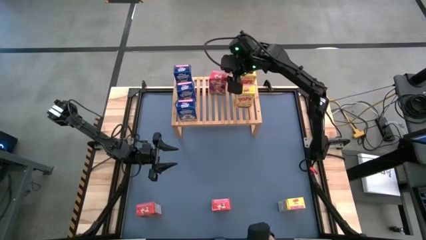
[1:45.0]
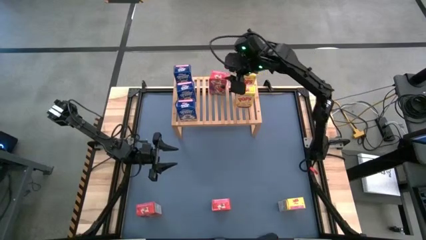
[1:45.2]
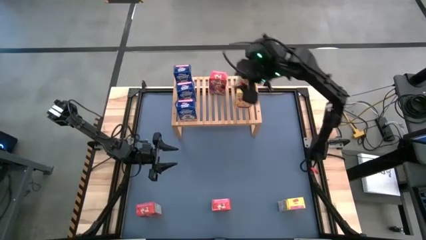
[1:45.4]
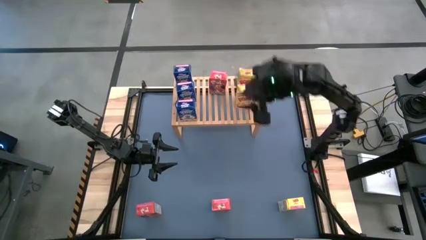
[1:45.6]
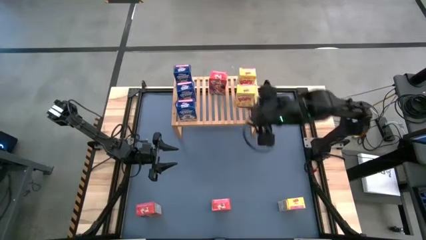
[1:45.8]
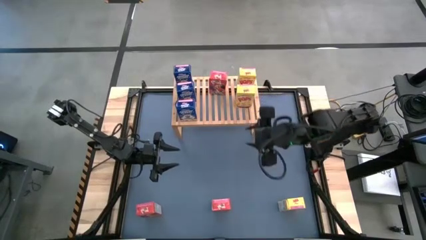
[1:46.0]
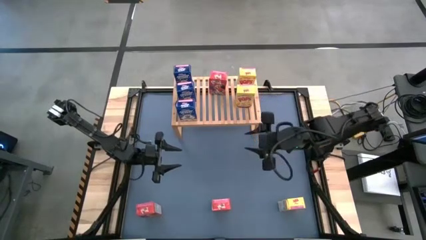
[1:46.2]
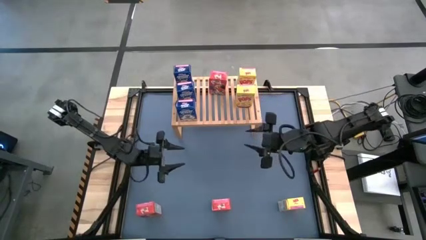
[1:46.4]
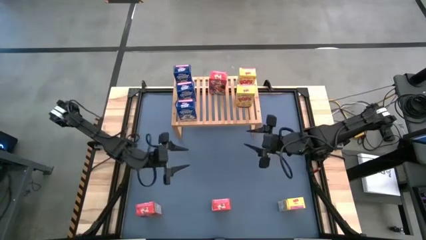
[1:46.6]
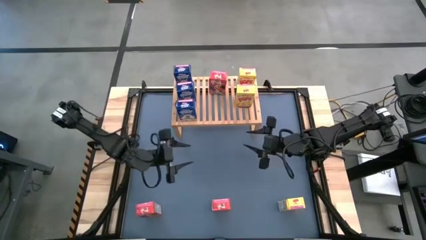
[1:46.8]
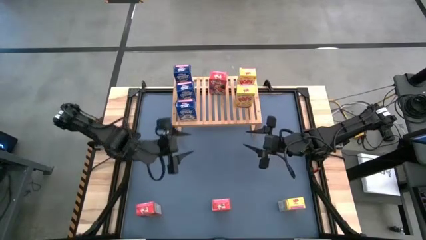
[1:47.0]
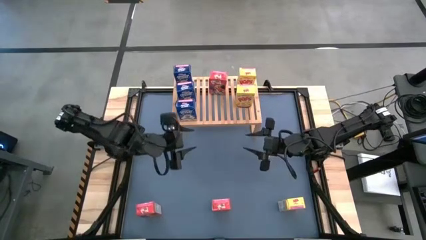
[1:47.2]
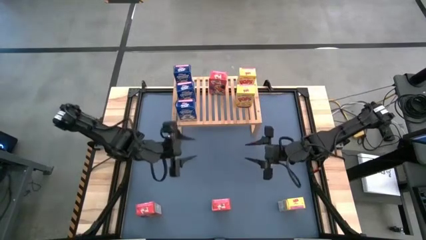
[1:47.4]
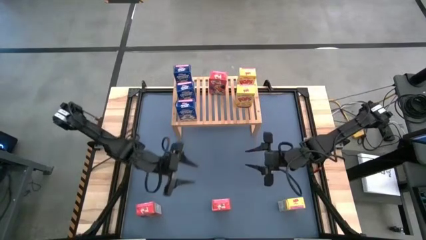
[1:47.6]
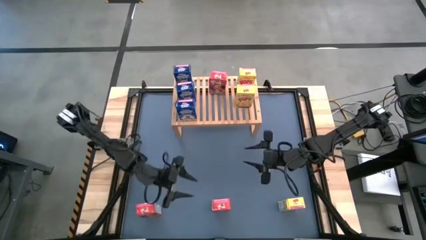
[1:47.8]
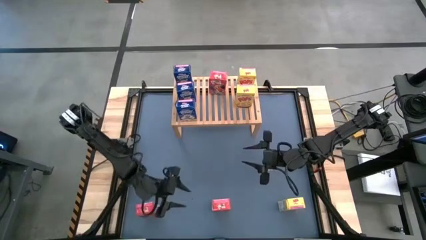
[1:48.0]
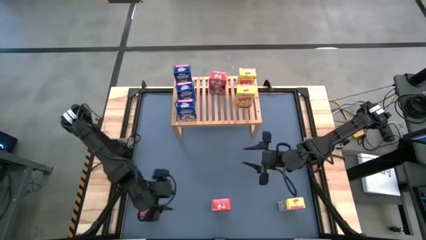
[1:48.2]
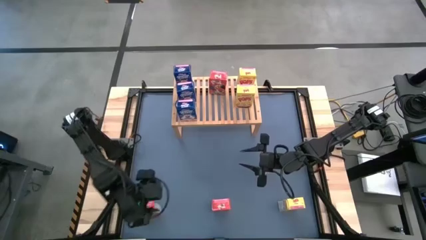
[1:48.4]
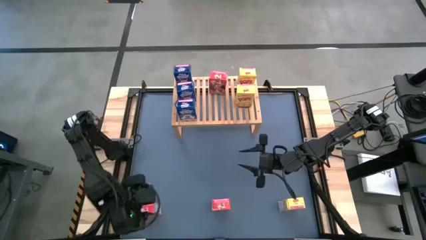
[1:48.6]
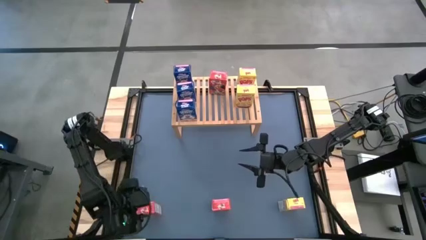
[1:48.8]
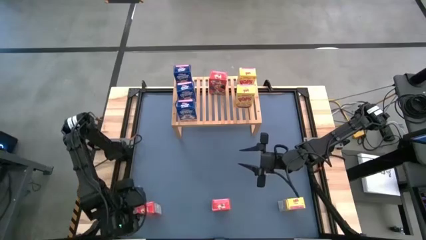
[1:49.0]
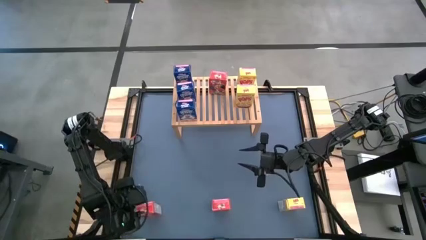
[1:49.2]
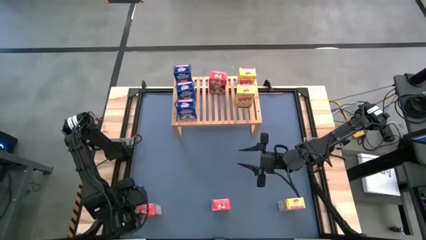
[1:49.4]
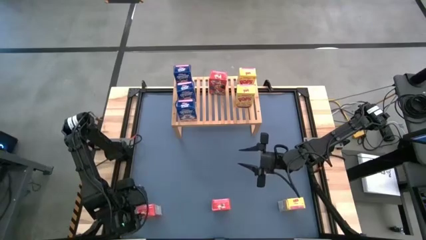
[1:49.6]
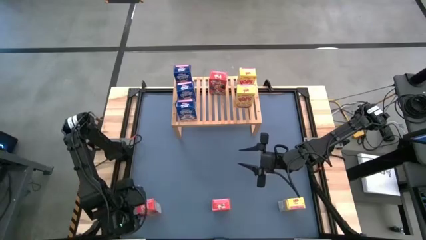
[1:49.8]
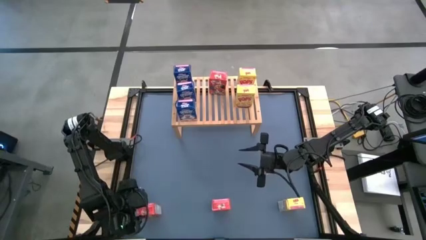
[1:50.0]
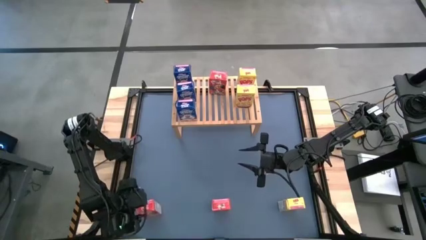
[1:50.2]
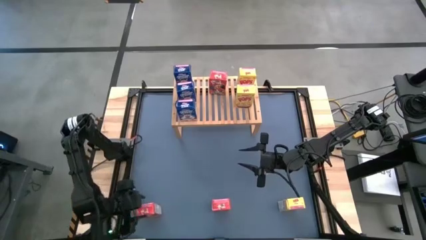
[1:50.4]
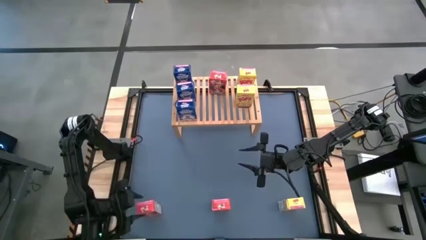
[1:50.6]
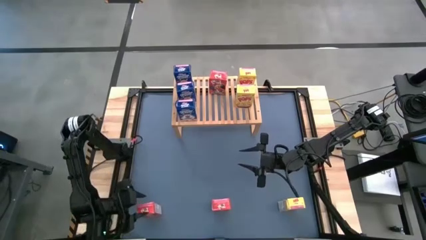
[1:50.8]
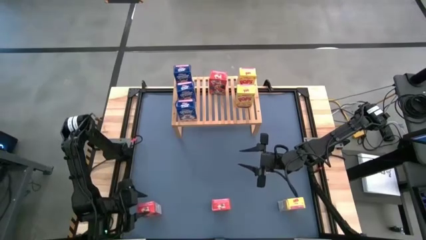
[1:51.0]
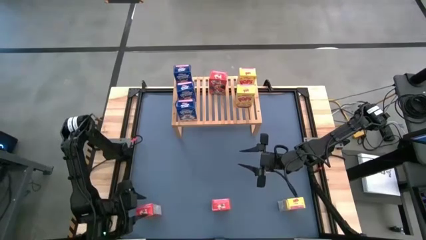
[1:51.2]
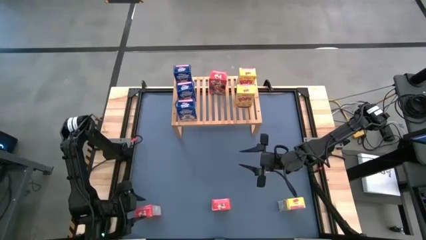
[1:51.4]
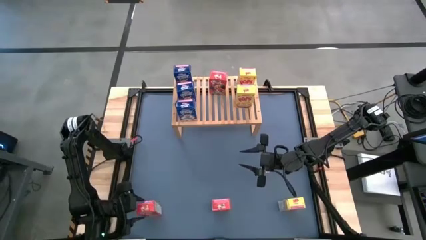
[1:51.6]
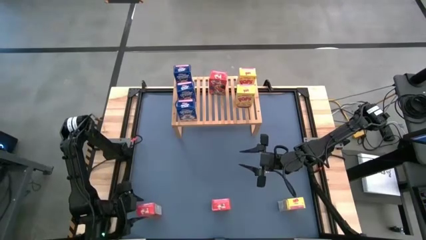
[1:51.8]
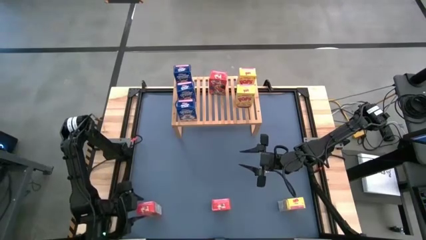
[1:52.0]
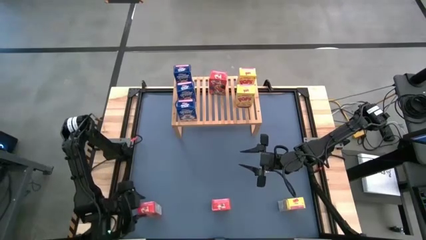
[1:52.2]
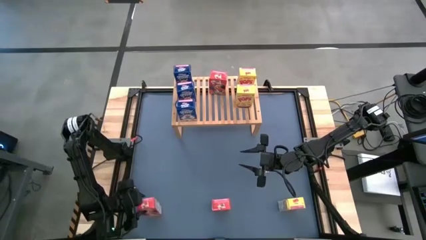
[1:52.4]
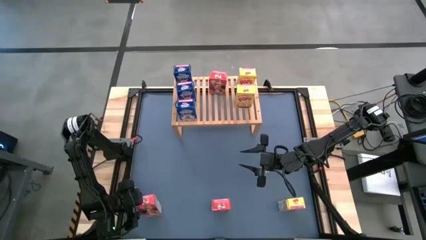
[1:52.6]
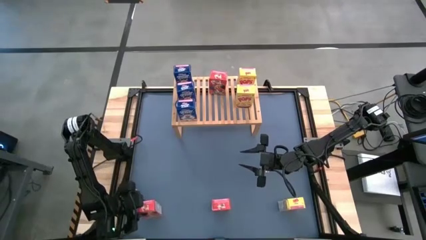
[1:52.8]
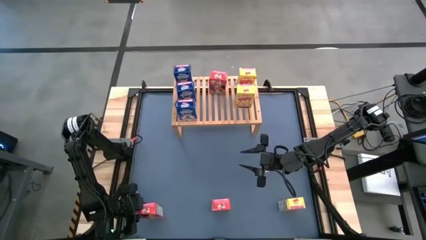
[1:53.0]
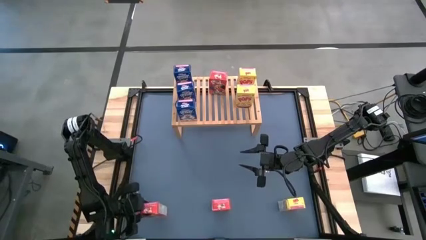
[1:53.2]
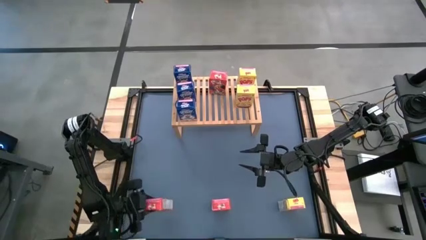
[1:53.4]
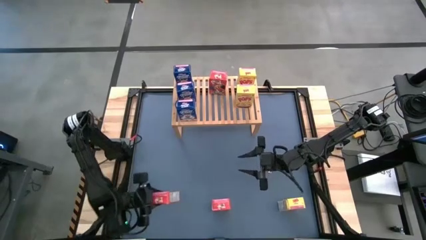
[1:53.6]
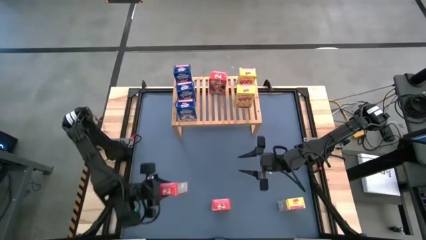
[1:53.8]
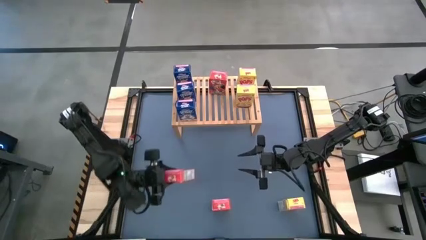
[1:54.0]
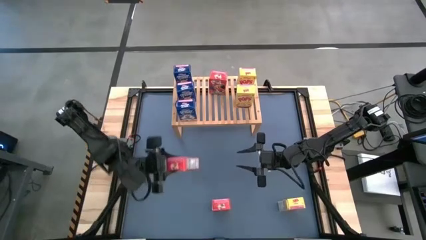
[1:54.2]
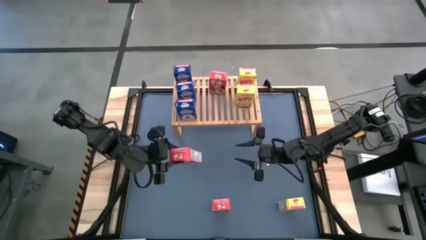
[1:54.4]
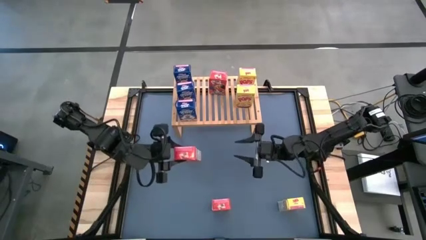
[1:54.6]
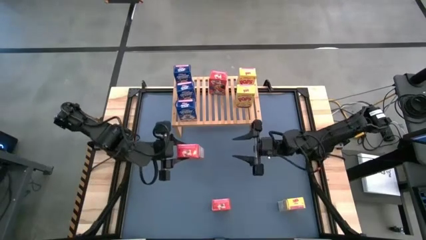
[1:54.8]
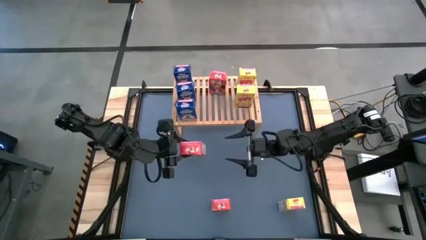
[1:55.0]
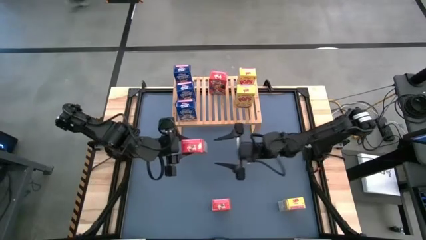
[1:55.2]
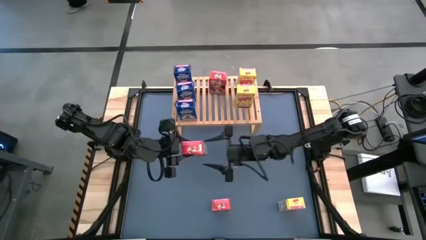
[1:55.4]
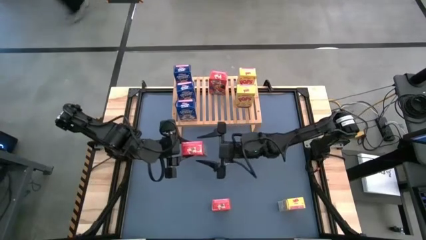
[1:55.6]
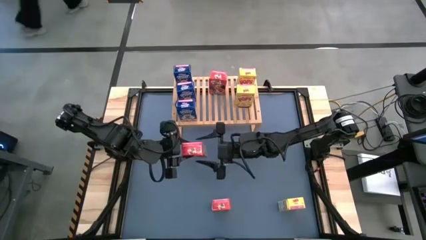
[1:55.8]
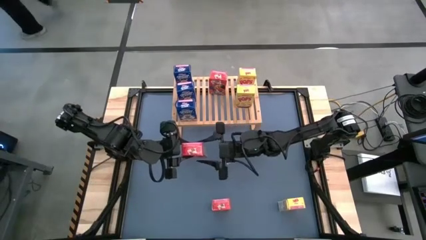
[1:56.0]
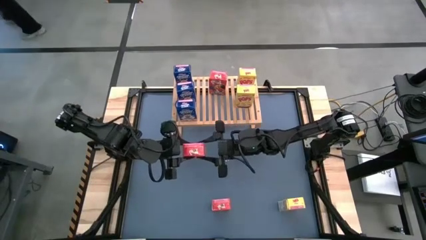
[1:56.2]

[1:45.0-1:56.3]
Task: Stack cereal on shelf
Put the left red cereal box on the shelf aligned with the other red cereal box

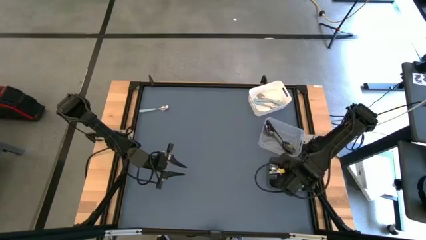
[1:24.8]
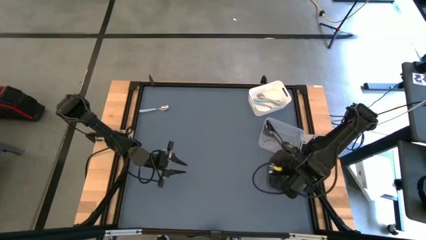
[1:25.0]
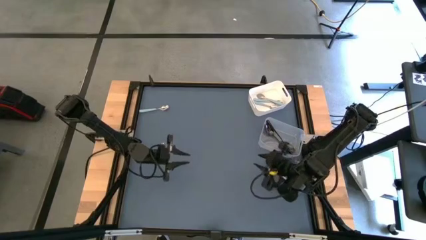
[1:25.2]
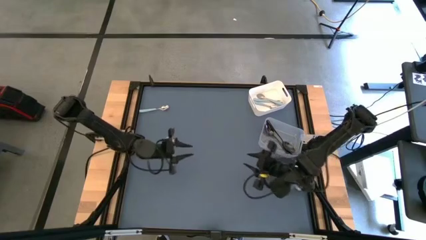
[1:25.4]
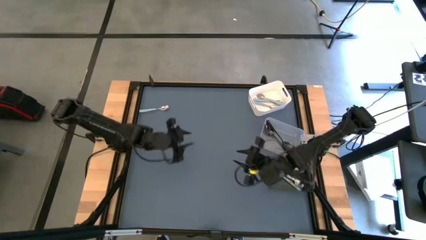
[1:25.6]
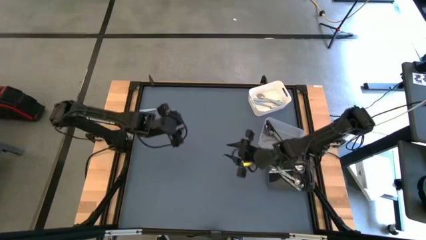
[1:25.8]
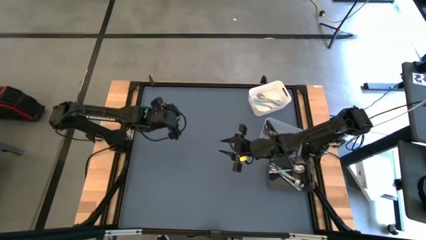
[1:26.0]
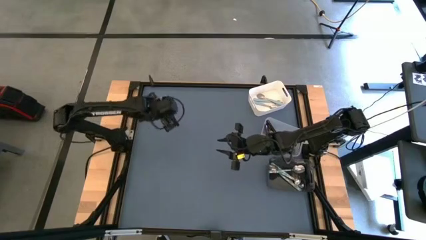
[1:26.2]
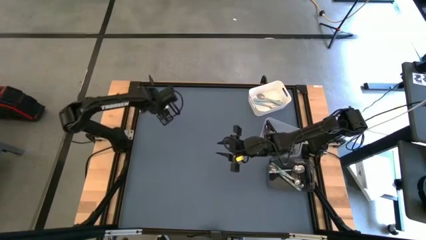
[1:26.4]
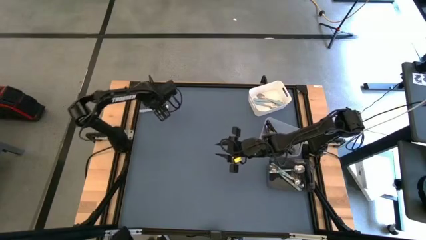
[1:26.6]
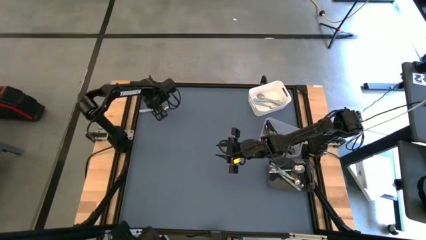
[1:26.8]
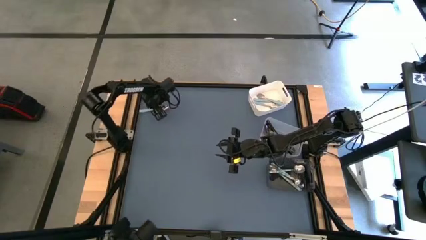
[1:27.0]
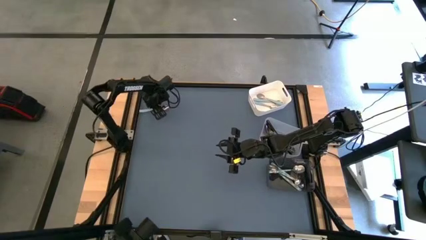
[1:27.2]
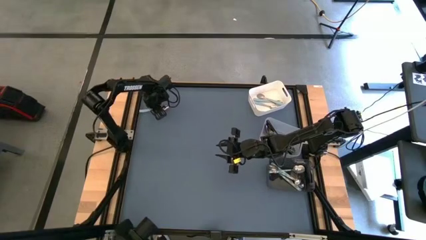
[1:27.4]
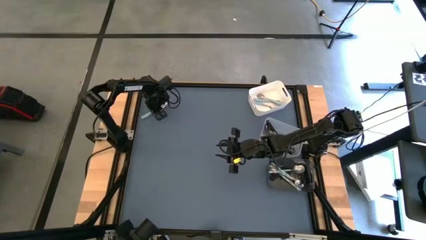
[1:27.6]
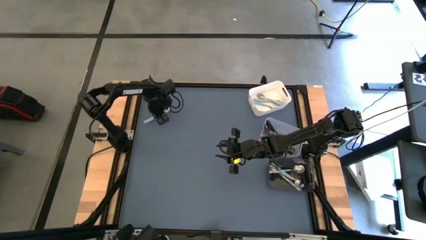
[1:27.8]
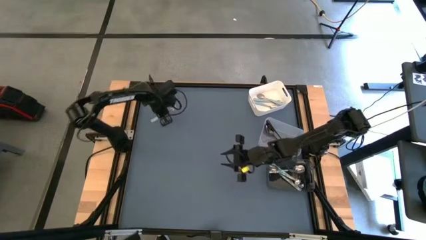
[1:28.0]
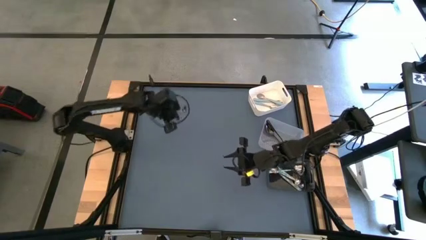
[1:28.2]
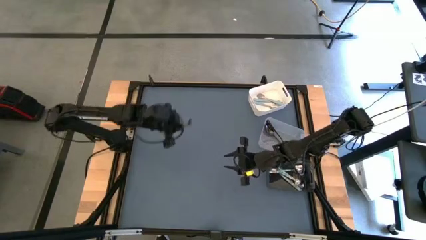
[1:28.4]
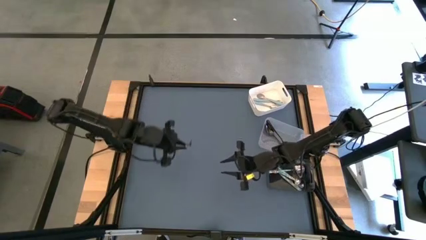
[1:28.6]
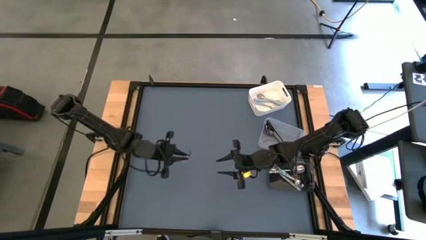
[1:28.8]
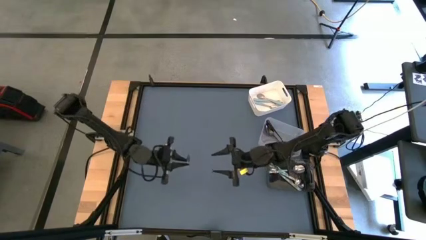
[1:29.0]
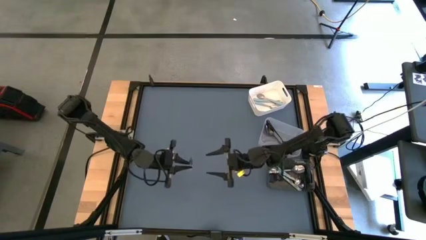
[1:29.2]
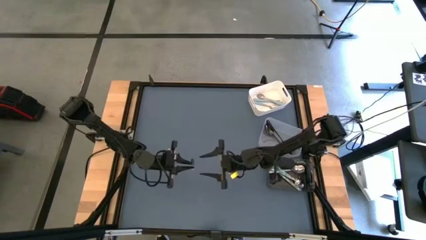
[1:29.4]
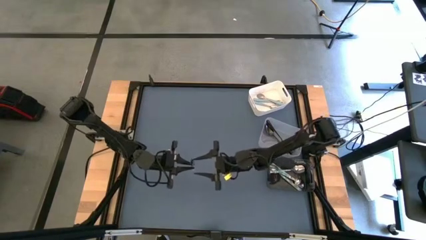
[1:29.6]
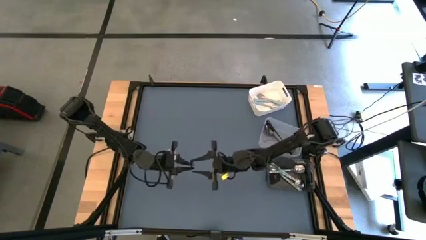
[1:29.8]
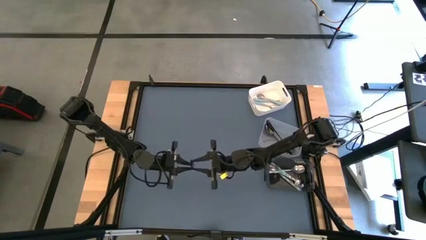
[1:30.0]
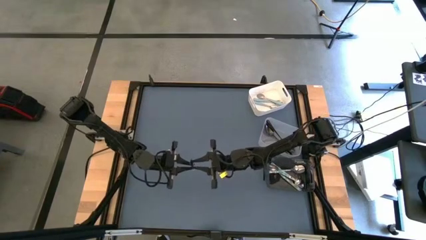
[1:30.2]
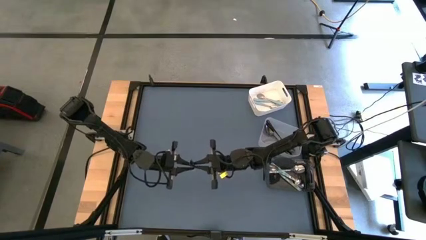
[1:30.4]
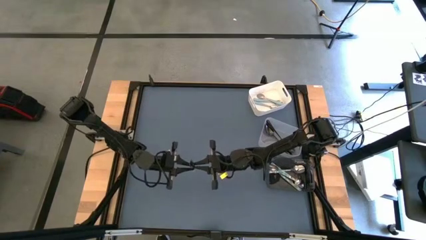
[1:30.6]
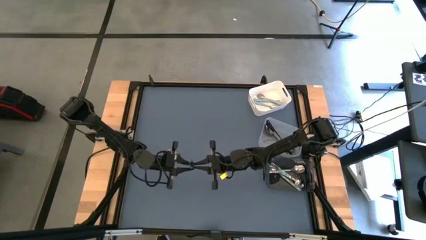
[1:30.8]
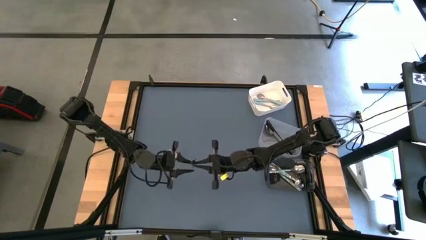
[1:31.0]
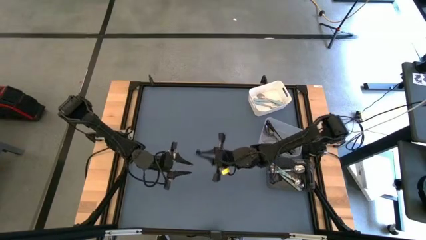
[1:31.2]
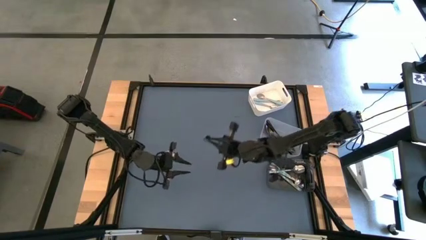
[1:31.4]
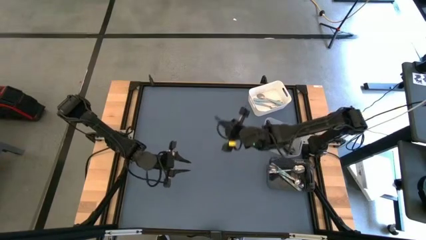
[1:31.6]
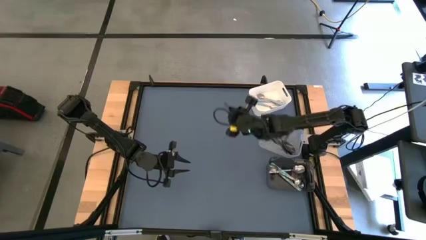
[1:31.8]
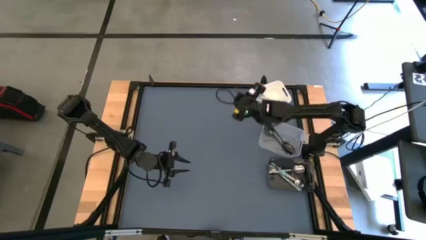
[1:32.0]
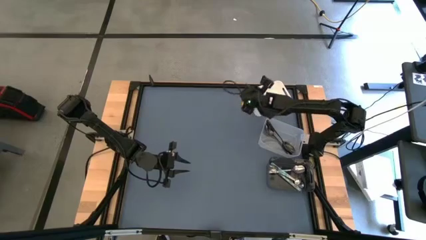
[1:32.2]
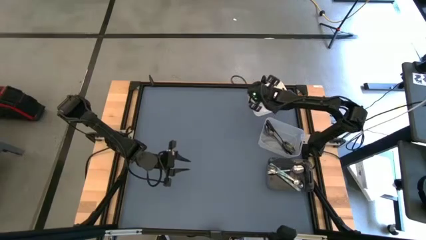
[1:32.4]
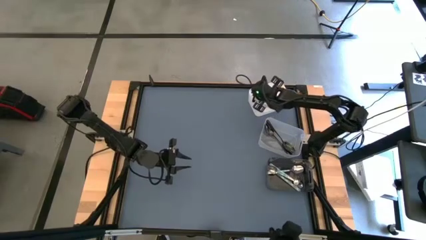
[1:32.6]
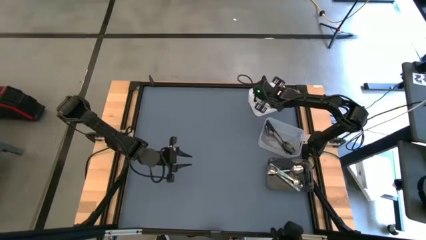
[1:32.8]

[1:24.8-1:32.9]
Task: Sort silverware by color (type)
Put the light blue spoon into the white bin
